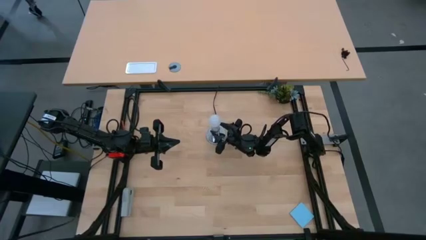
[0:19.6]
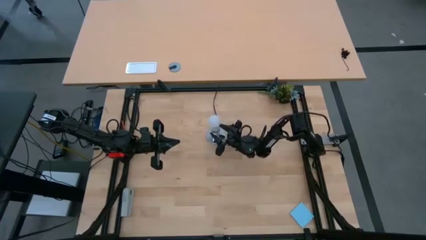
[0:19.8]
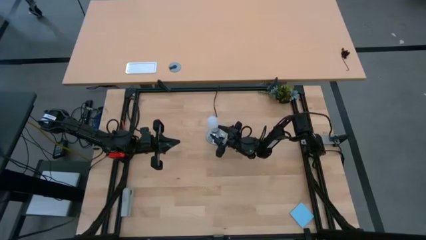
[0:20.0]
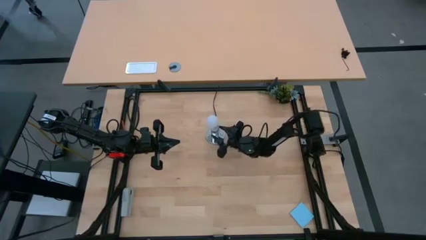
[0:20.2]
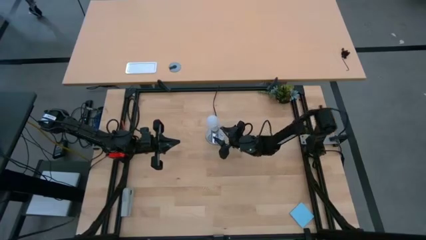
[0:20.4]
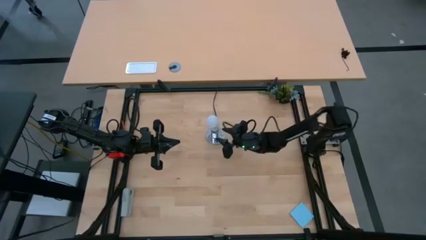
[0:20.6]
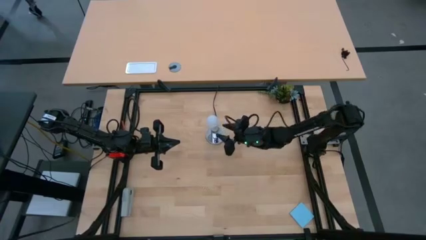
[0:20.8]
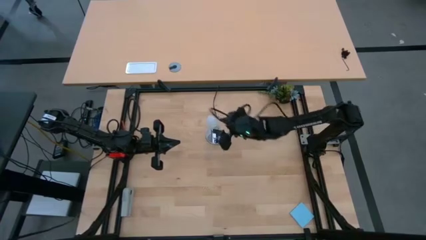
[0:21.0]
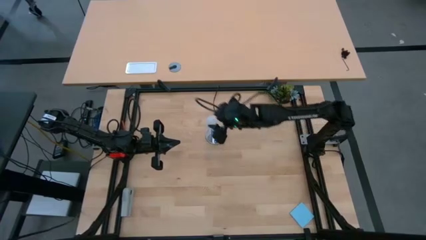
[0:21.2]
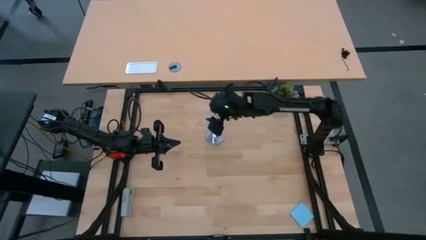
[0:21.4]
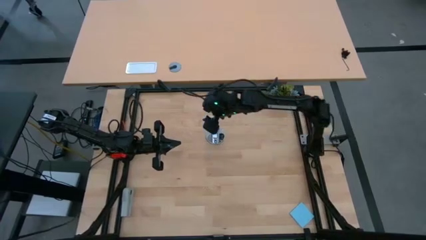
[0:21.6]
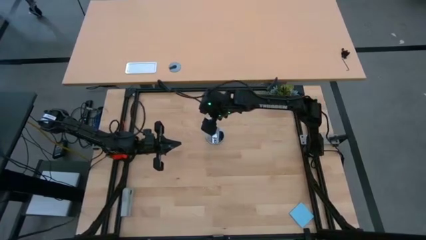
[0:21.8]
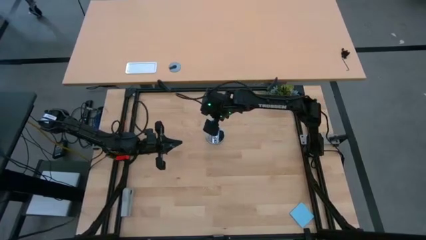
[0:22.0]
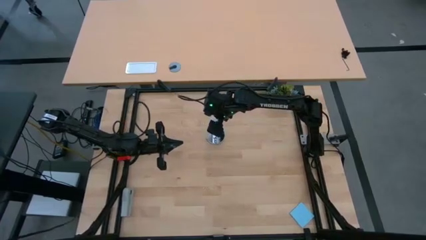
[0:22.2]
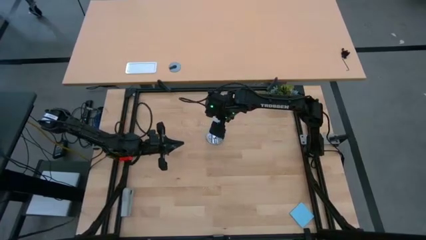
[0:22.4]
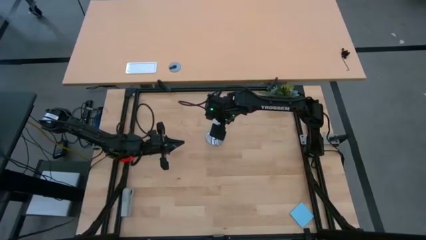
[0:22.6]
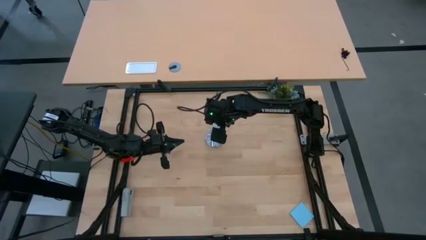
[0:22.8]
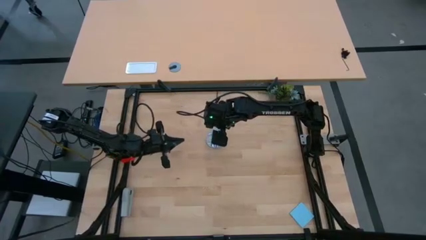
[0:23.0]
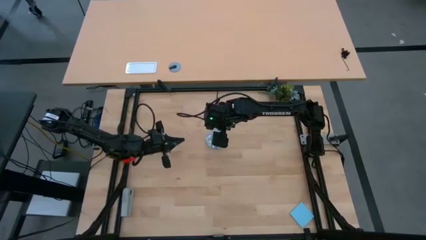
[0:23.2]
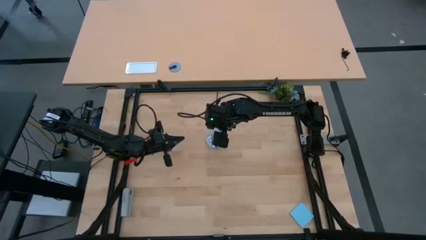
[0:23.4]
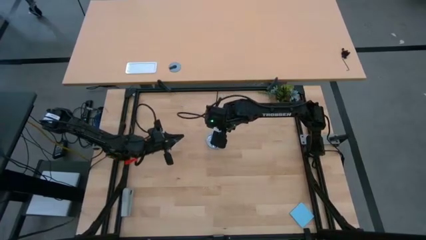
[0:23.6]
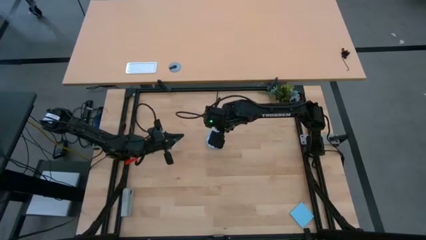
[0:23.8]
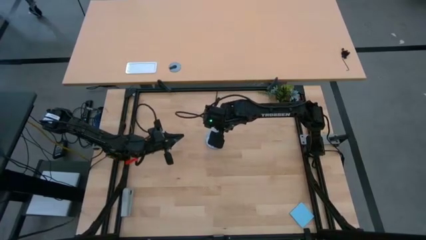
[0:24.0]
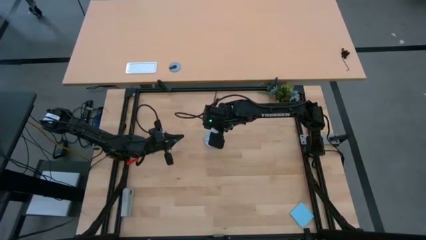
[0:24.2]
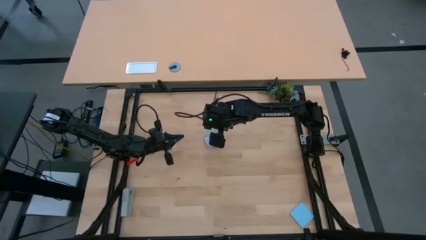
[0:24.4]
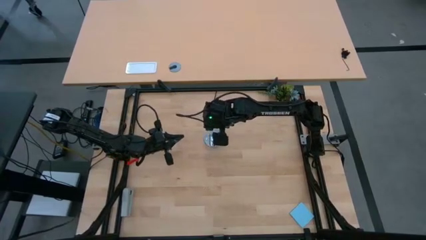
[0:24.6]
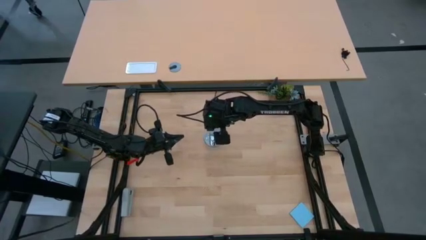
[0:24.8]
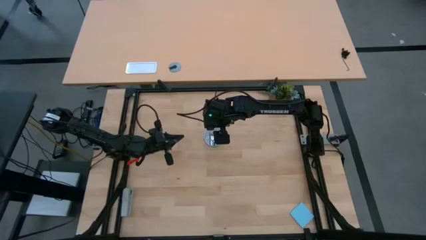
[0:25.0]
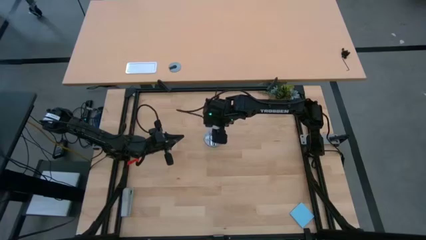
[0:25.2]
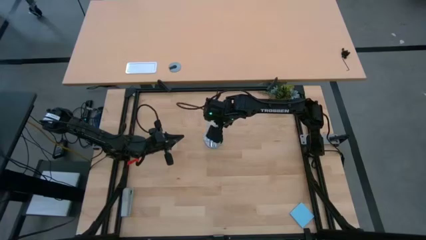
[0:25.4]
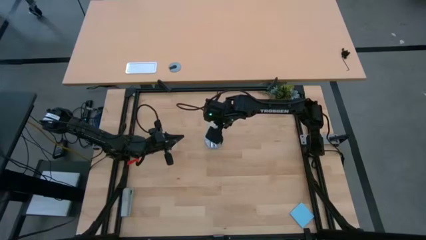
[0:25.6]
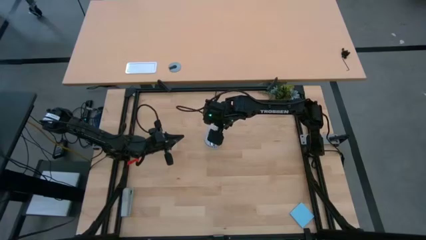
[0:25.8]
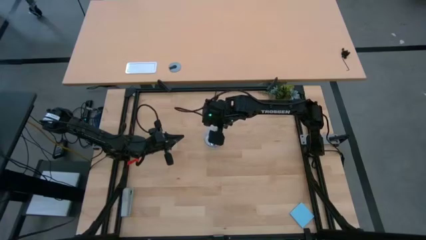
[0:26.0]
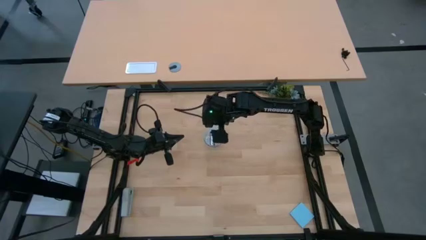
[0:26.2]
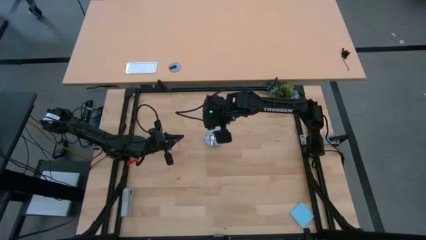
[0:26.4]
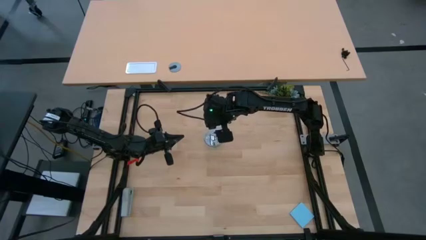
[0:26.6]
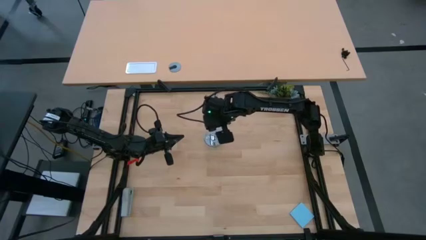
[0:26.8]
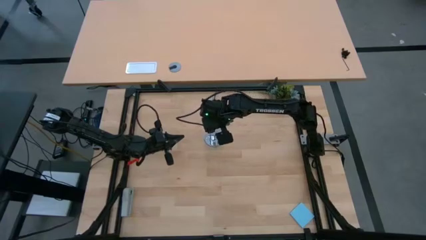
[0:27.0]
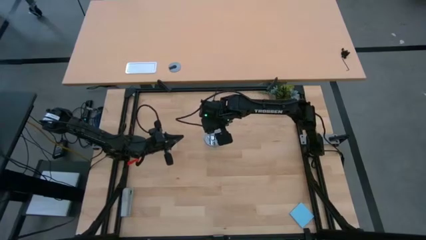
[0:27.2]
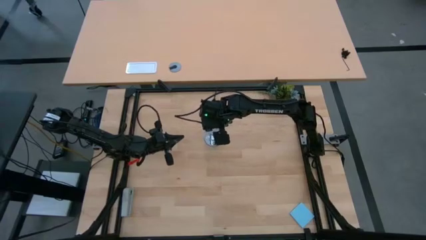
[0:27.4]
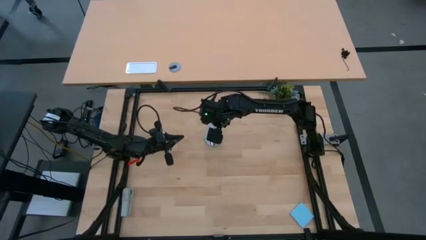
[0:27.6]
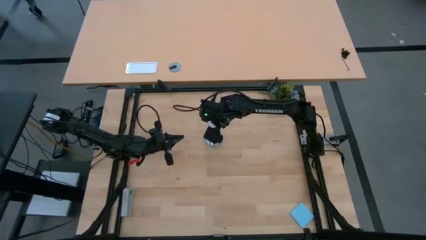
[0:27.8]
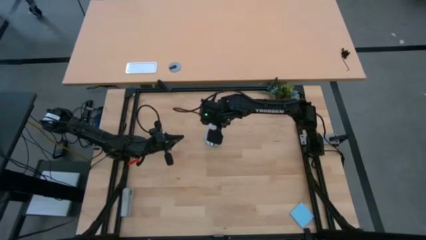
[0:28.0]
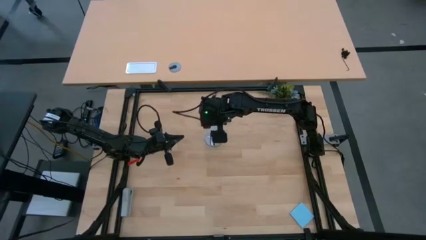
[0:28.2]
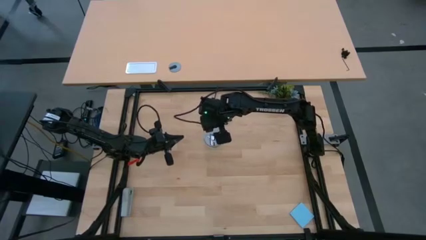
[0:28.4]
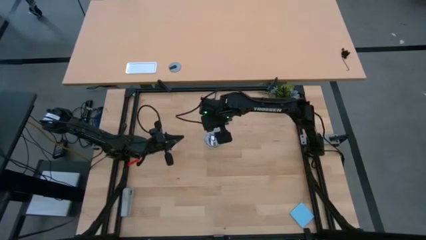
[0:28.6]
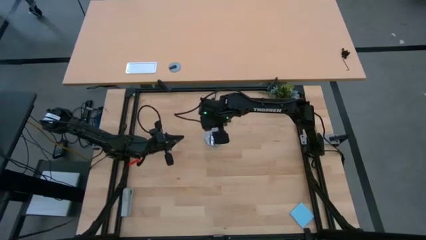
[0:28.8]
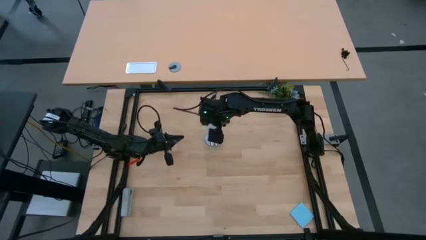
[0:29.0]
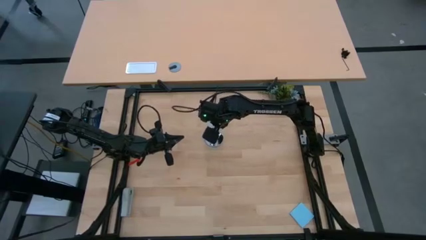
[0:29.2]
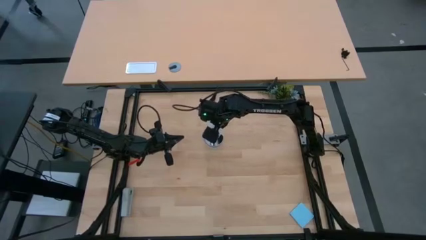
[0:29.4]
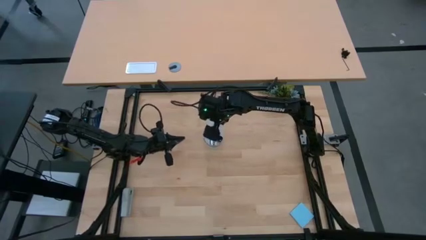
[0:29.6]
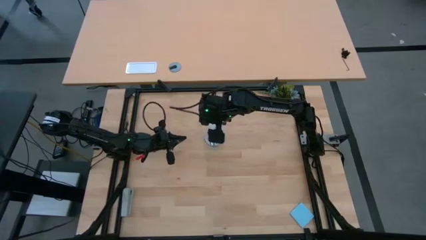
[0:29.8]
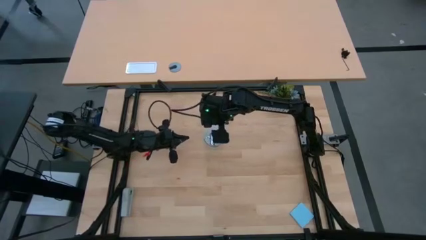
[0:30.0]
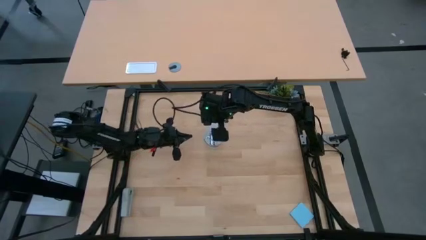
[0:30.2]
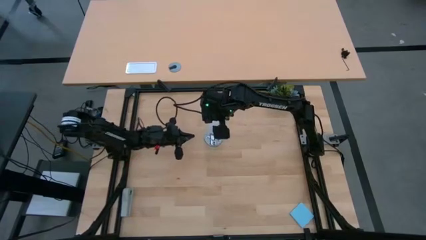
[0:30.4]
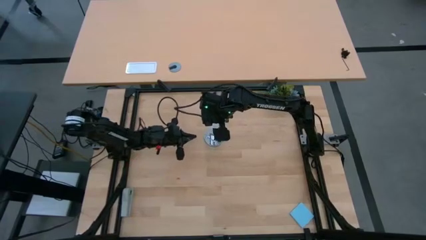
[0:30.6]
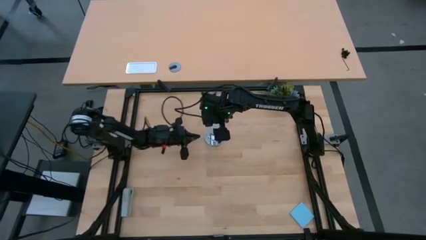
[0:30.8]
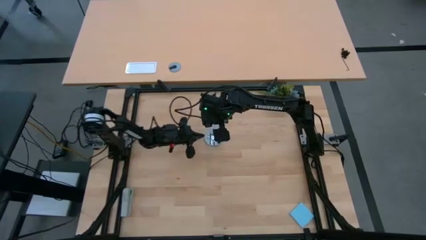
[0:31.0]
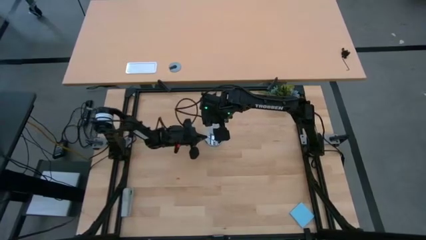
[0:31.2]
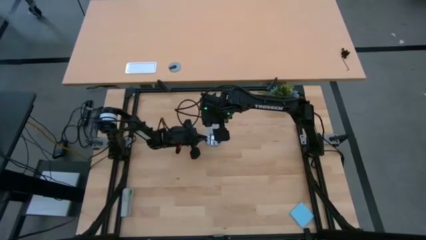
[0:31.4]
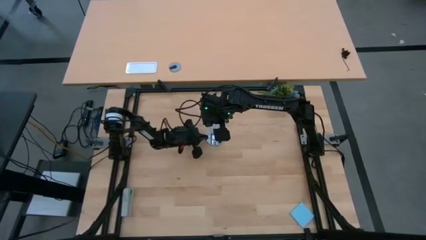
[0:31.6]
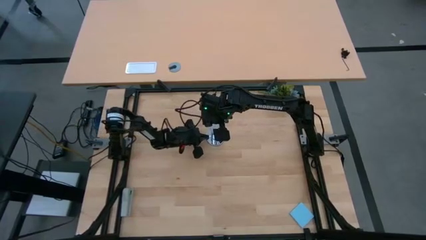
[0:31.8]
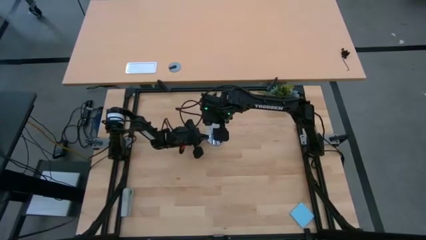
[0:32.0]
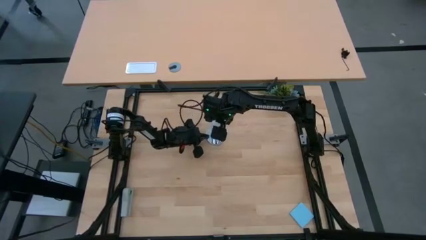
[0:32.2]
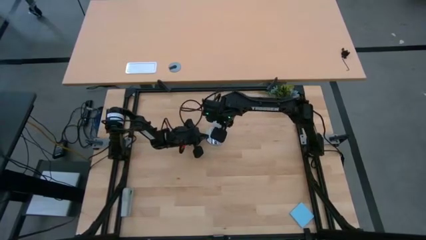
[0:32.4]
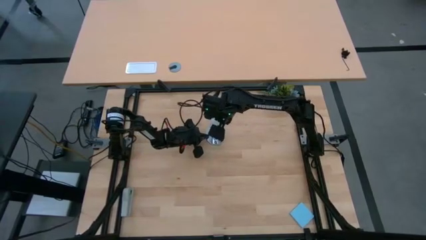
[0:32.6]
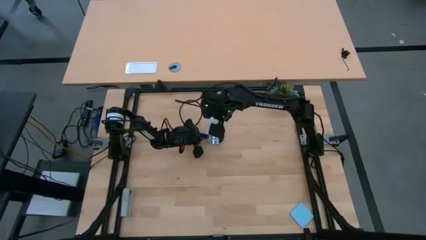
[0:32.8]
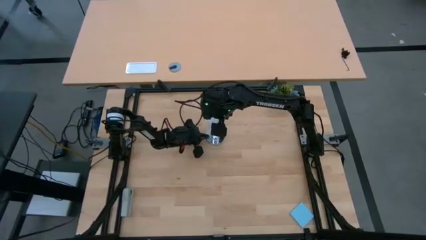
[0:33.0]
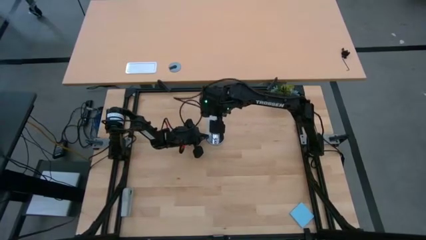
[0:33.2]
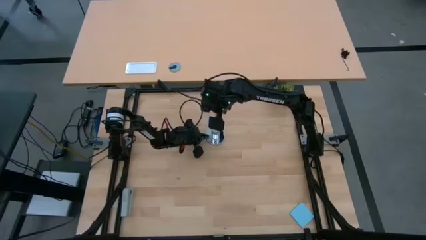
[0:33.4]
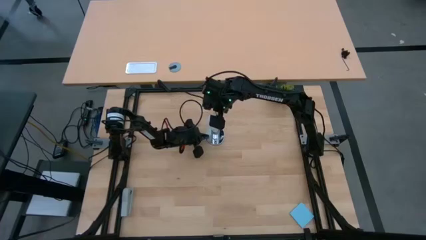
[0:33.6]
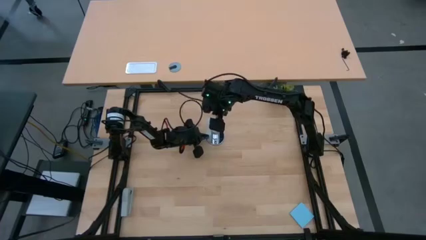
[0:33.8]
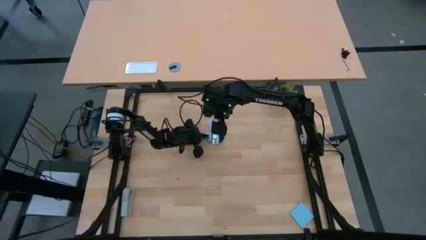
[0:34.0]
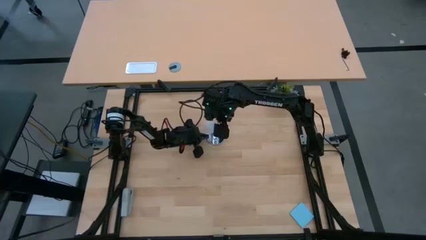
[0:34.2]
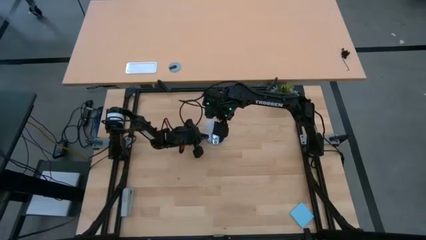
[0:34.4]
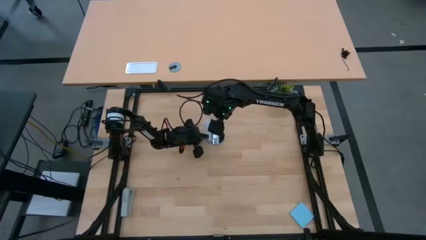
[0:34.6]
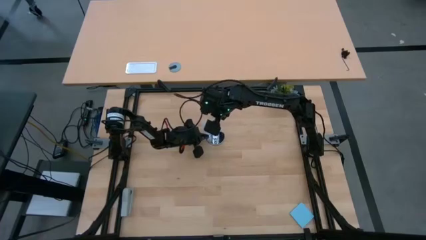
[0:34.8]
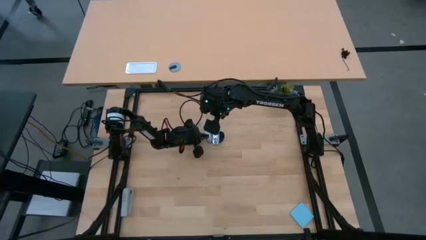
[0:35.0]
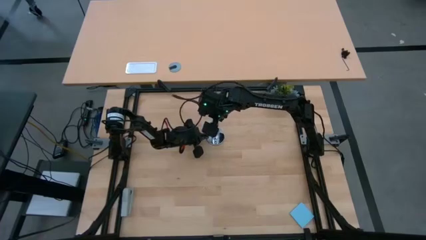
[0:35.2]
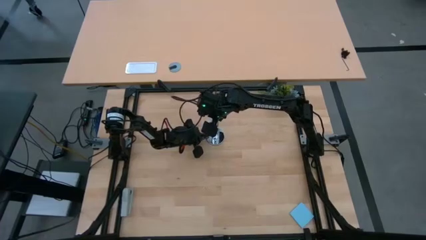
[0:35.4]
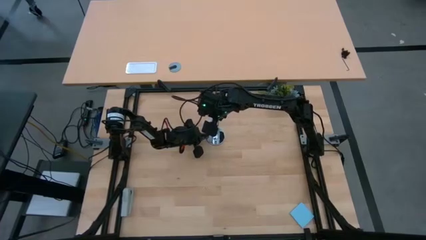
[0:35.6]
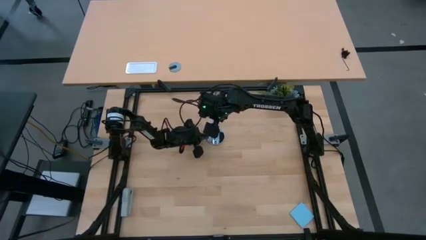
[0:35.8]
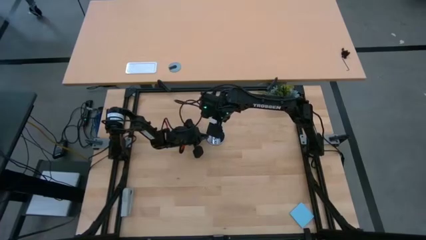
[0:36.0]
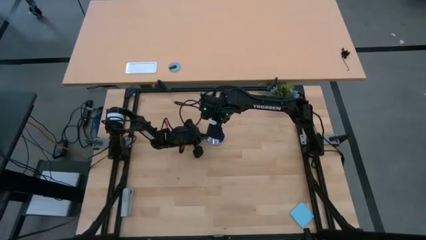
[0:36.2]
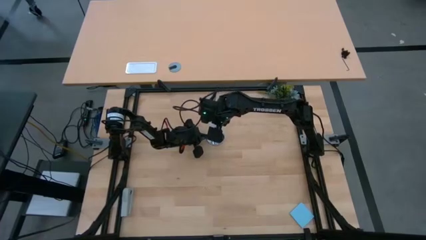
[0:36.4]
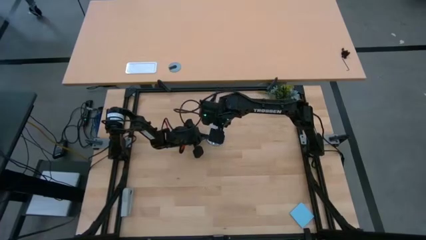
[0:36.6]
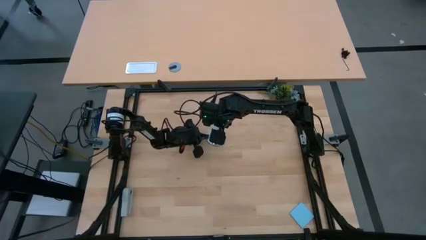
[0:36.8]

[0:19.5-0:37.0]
Task: Screw lightbulb
Insert the lightbulb into the lamp socket
